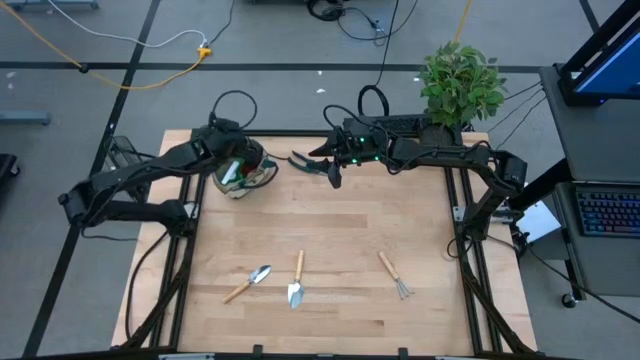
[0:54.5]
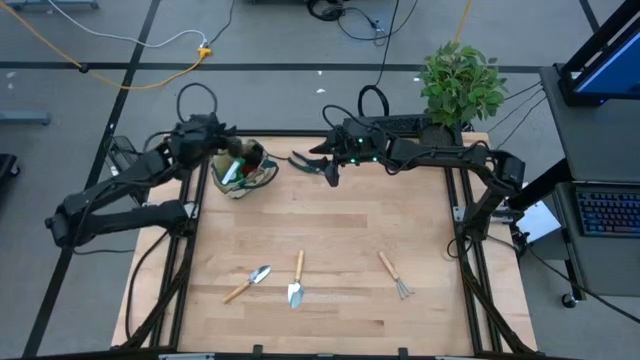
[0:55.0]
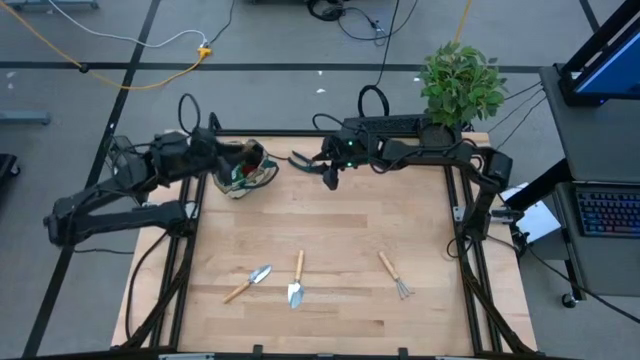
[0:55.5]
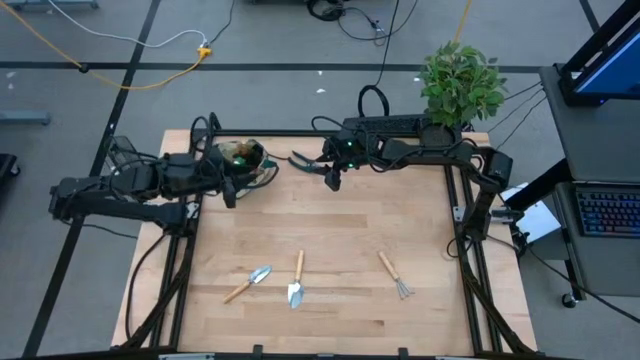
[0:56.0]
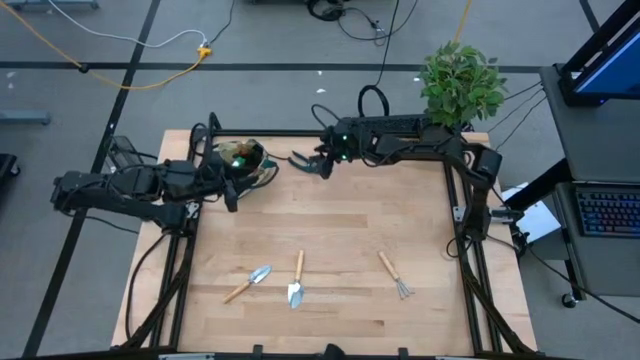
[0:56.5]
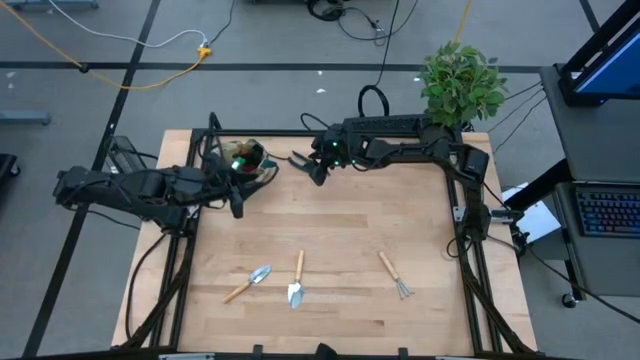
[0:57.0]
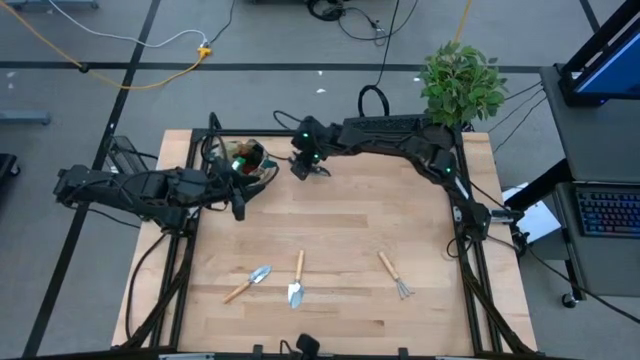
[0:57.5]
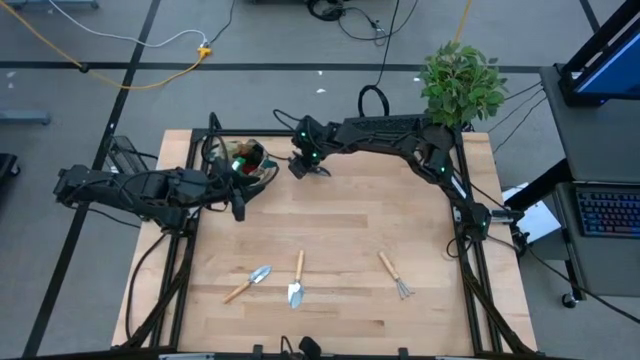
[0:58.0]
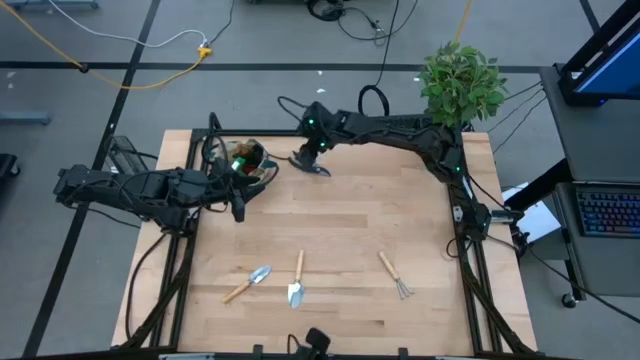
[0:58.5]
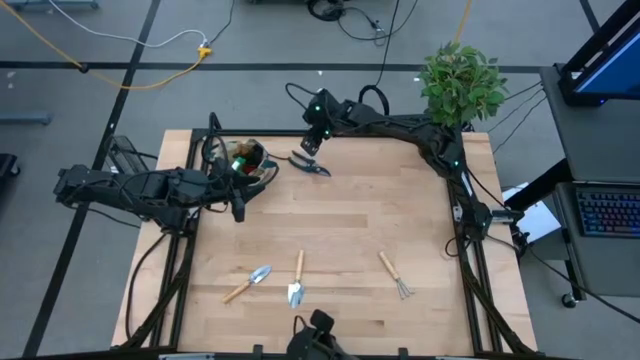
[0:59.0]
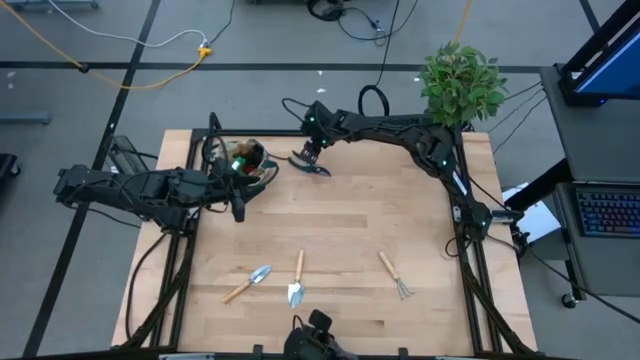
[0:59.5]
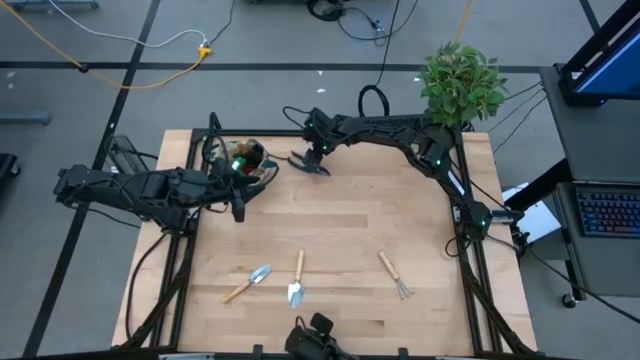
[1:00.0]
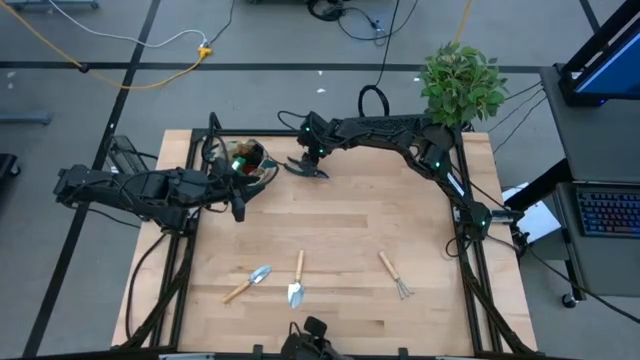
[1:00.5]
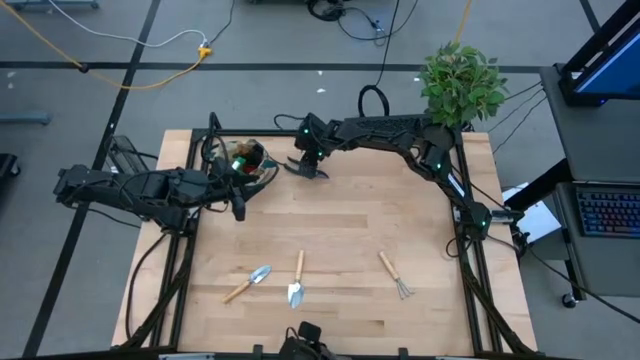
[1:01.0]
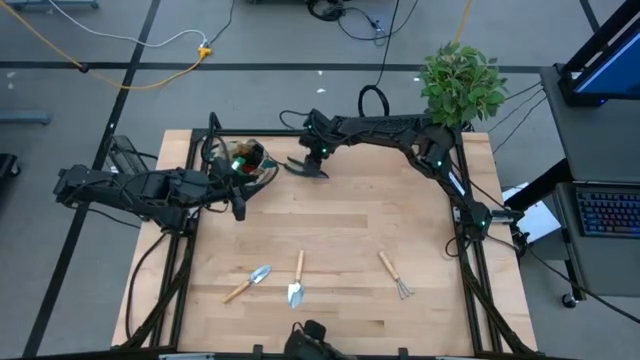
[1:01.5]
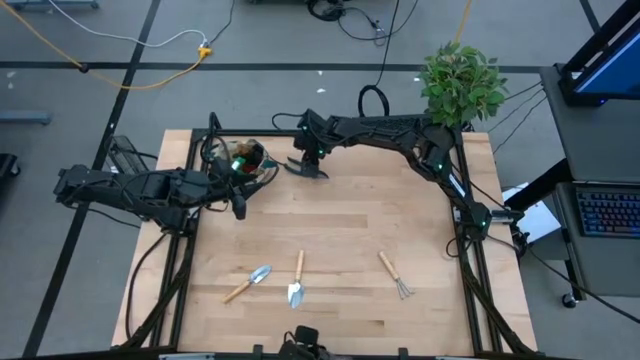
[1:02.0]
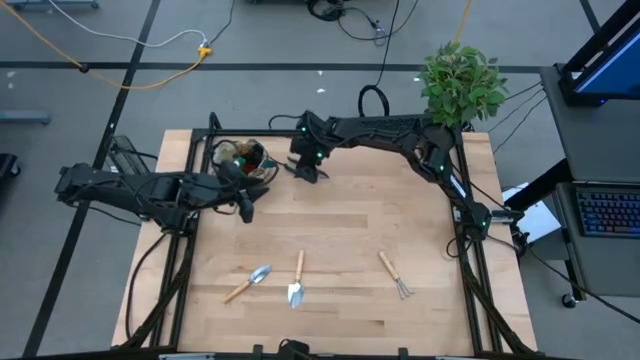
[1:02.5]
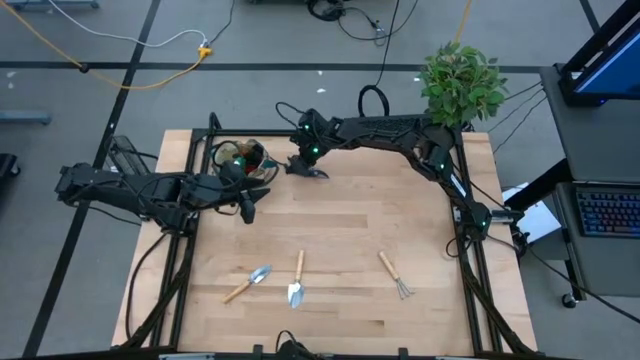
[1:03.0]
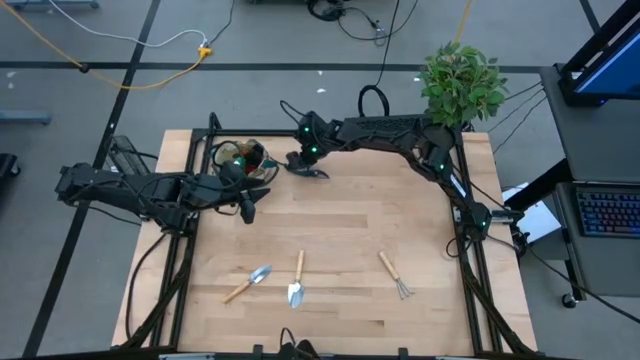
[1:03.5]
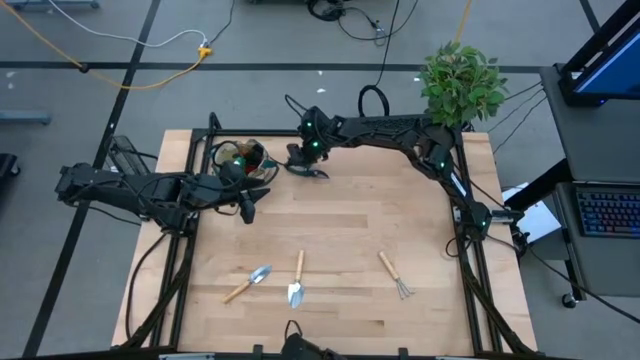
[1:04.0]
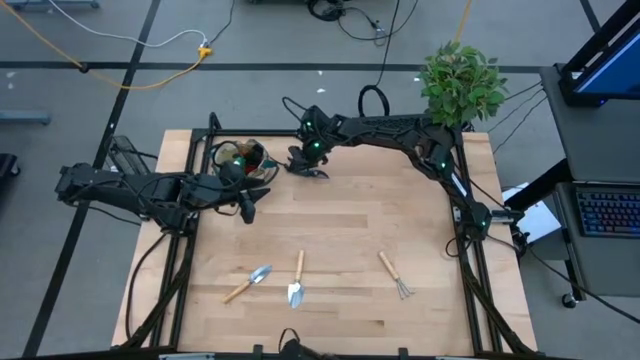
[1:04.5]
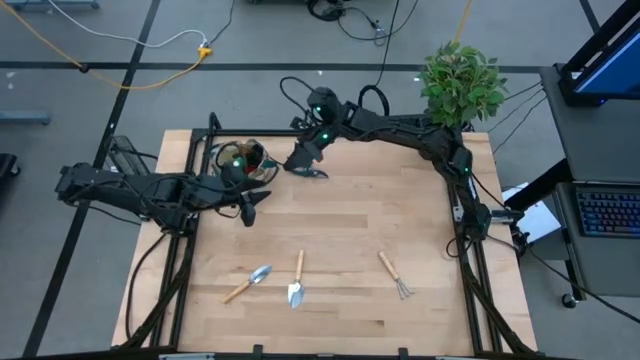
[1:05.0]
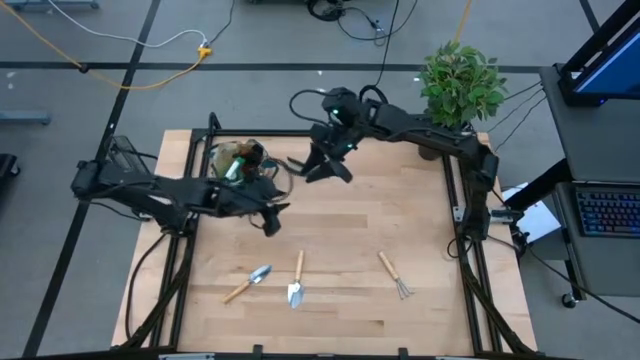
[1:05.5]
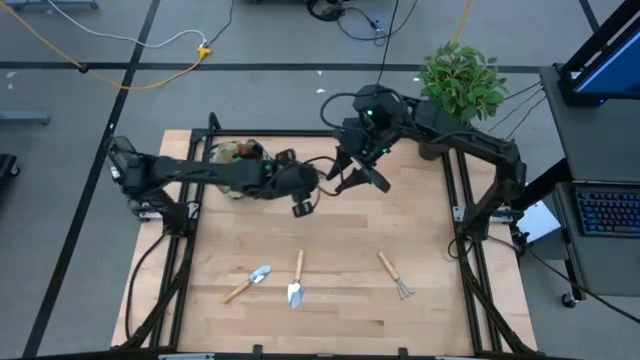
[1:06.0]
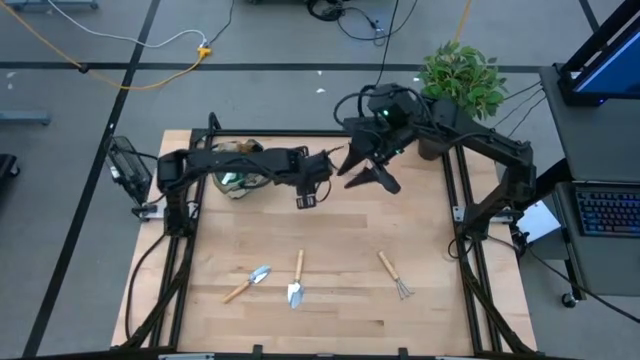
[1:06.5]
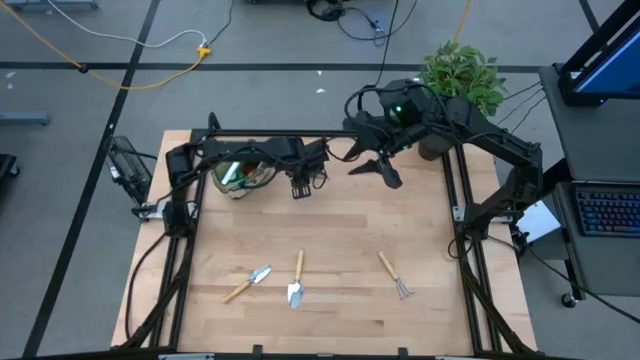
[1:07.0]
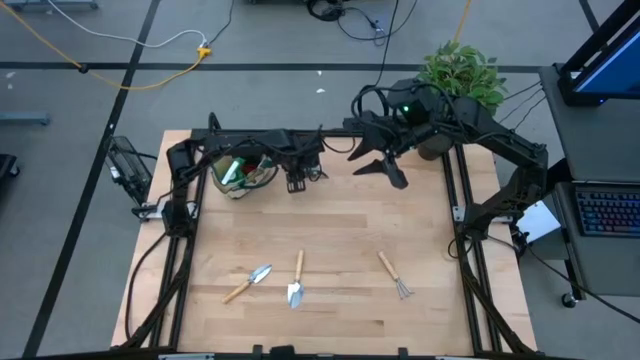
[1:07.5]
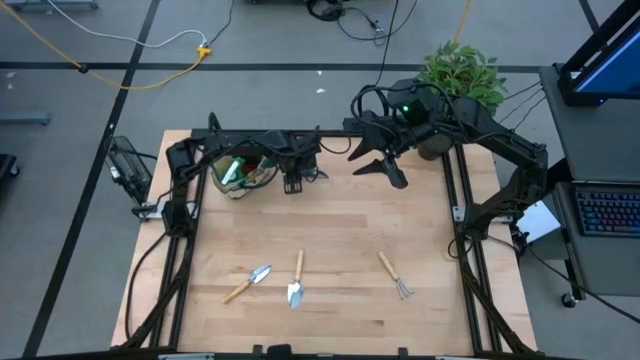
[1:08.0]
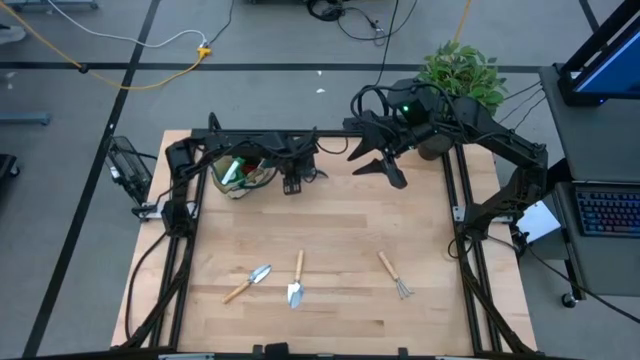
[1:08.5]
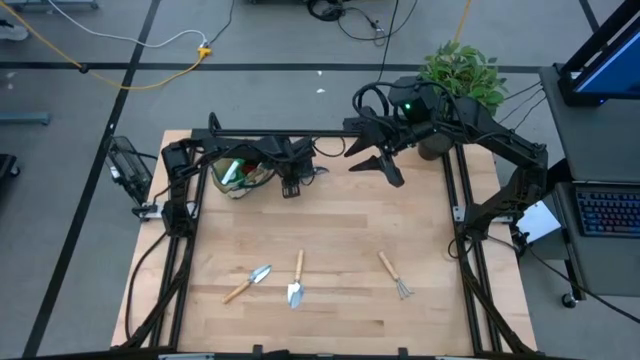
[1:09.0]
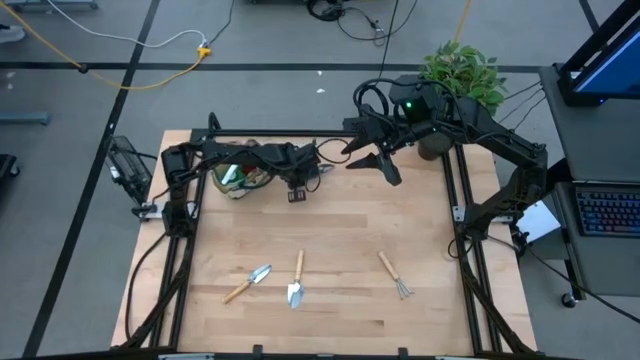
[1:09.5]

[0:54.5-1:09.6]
Task: Pick & Place Garden tools in Gardening bag
Put the shear scissor into the gardening bag

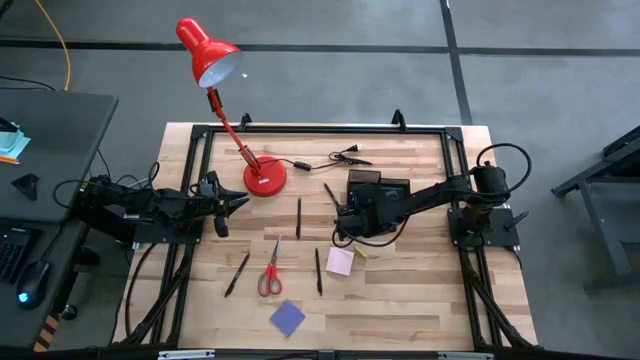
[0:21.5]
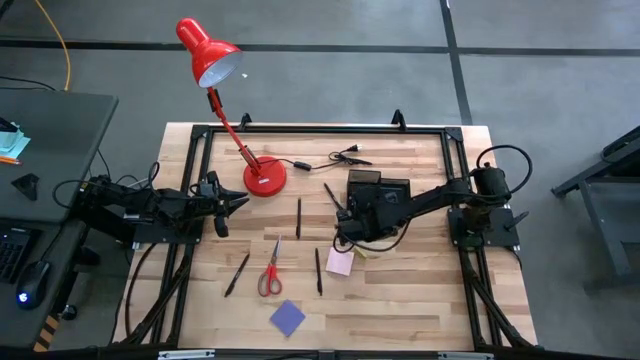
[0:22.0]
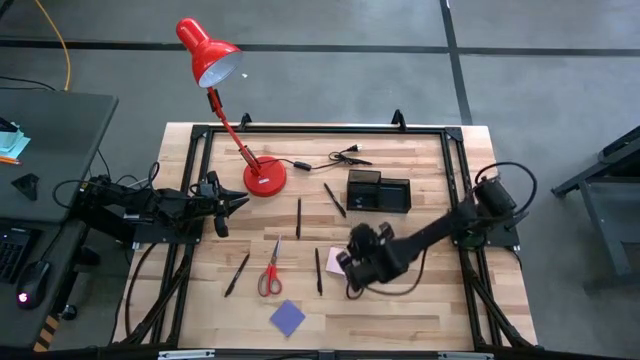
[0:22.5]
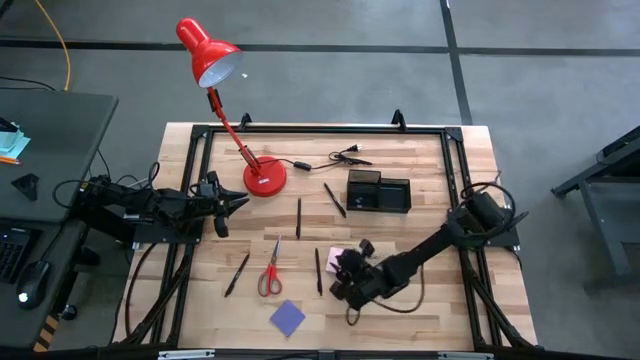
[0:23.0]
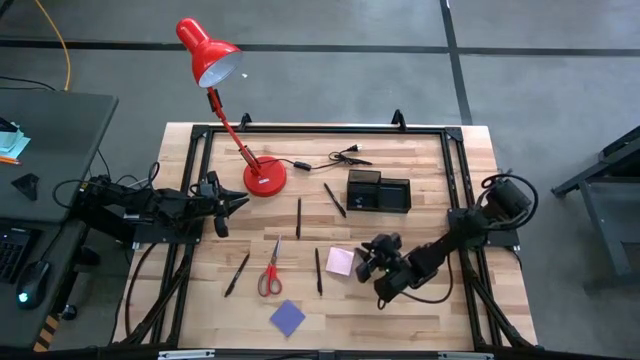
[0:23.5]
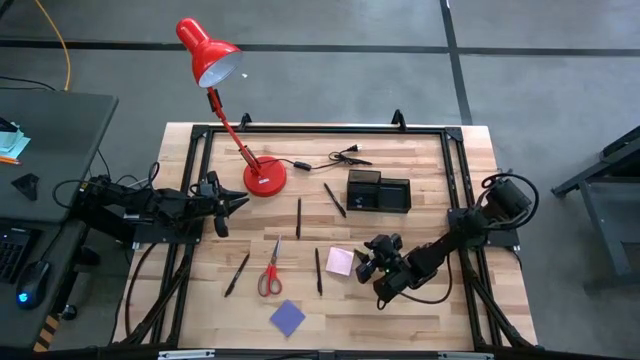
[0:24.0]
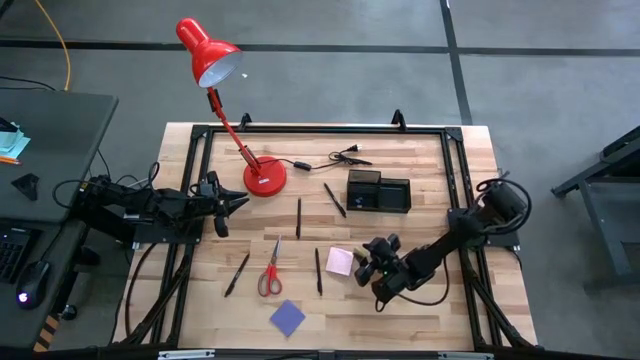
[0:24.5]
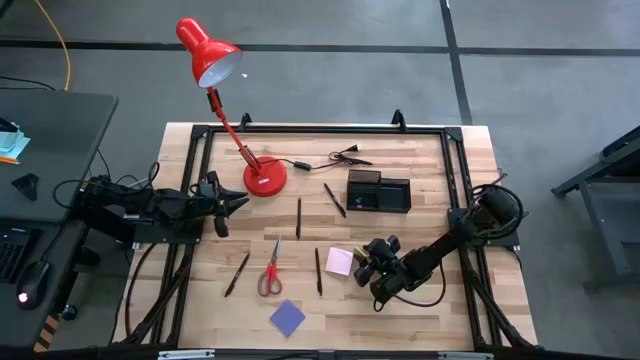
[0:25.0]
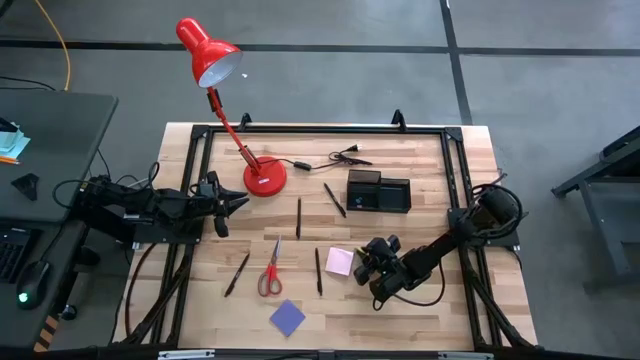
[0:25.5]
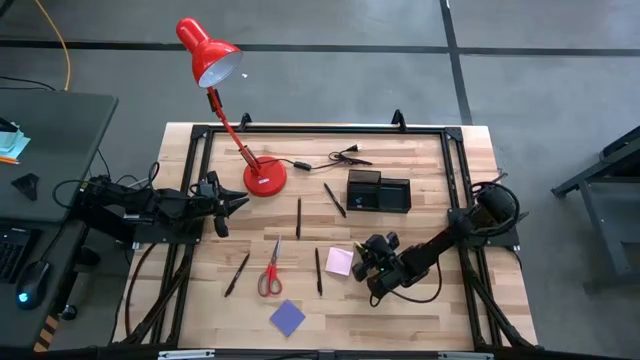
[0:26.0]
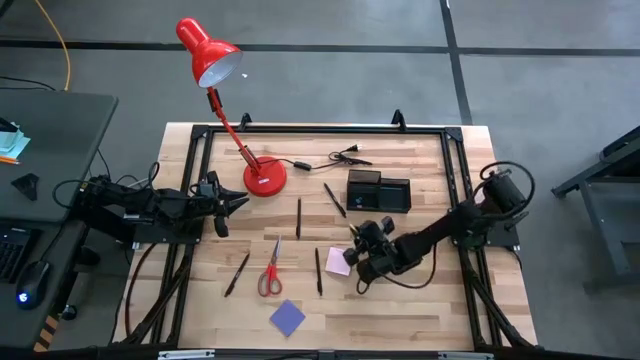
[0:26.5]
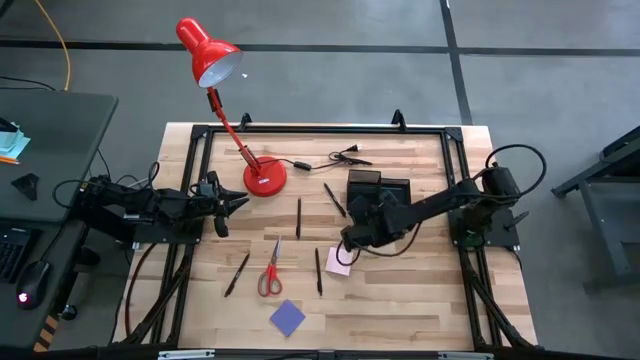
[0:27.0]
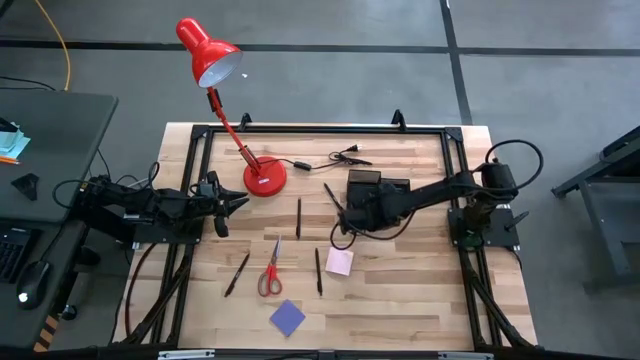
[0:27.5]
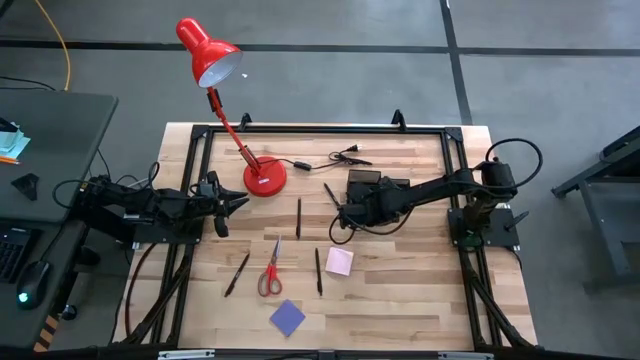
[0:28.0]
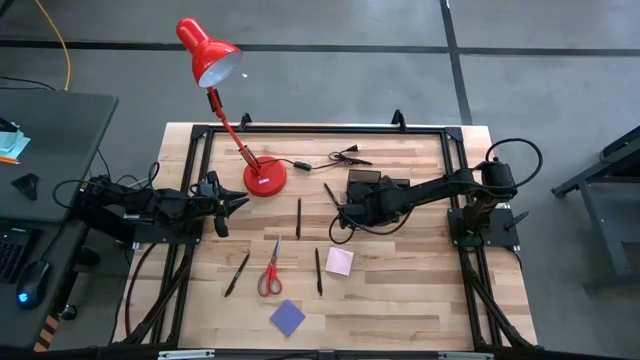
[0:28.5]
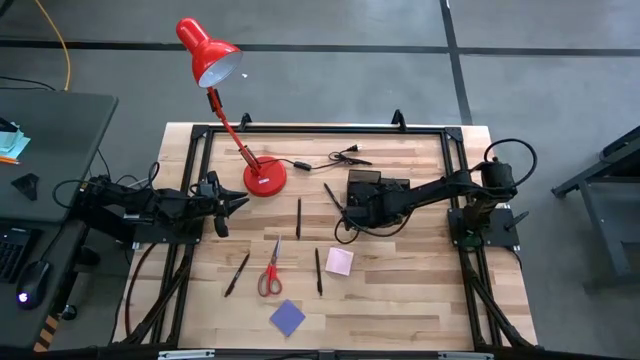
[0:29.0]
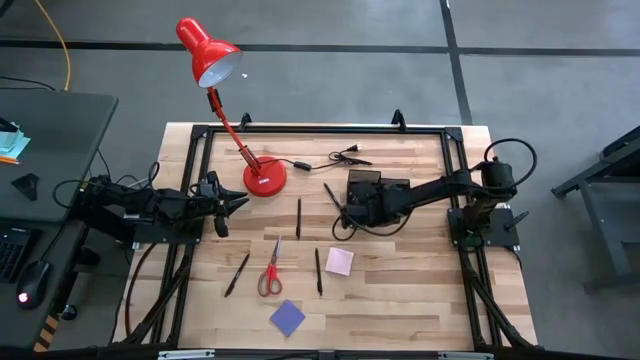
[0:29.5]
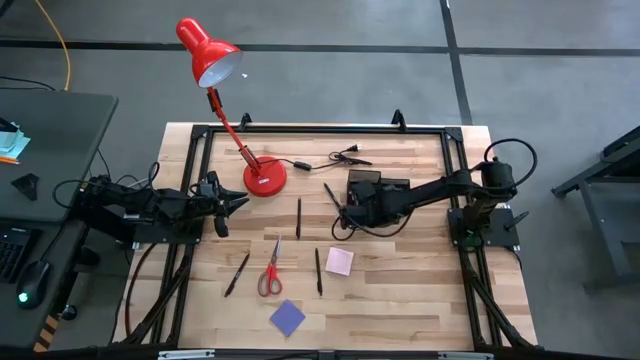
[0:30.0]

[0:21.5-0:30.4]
Task: Pick and place office supplies into organizer
Put the green eraser into the desk organizer
